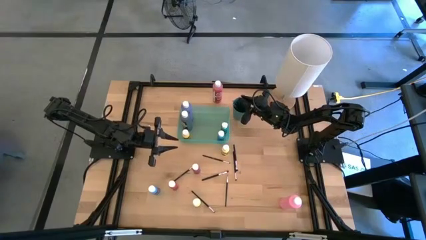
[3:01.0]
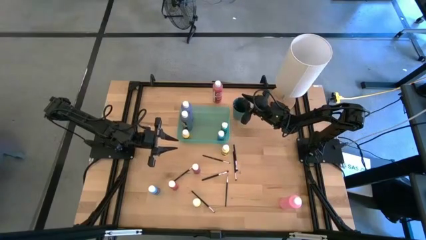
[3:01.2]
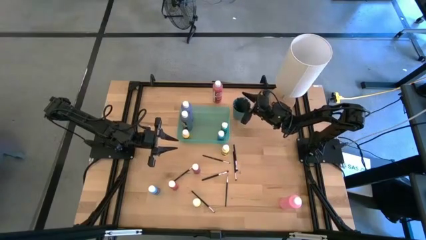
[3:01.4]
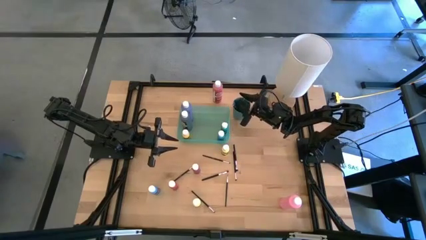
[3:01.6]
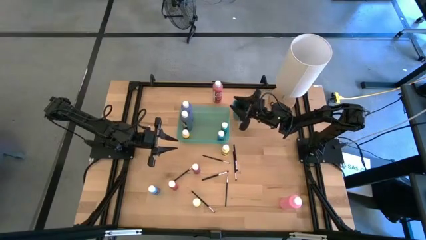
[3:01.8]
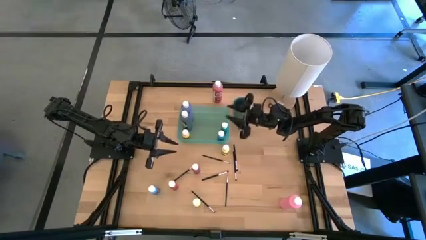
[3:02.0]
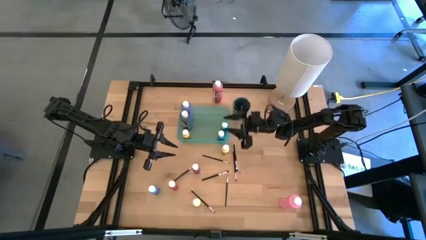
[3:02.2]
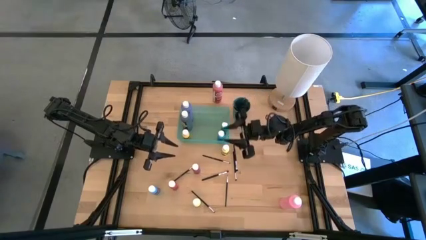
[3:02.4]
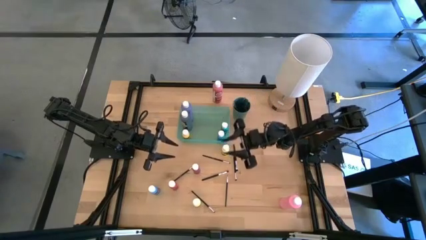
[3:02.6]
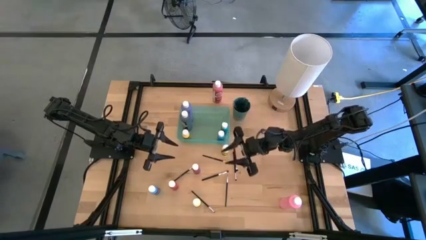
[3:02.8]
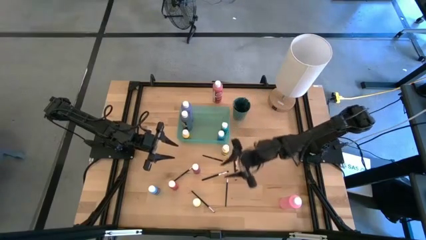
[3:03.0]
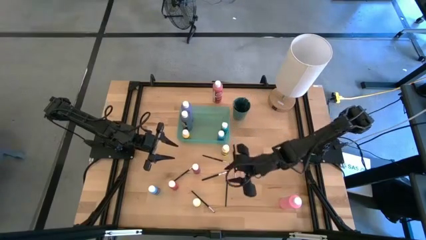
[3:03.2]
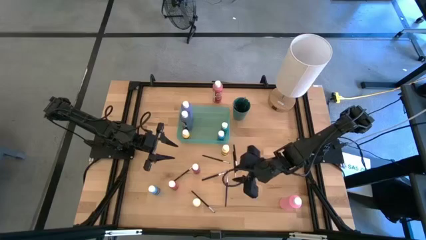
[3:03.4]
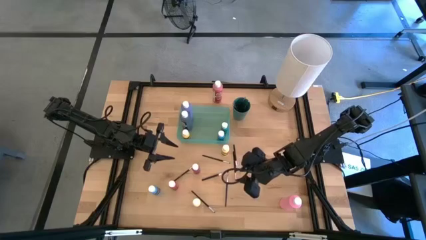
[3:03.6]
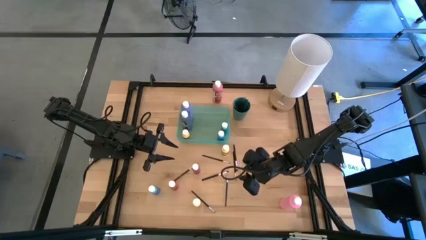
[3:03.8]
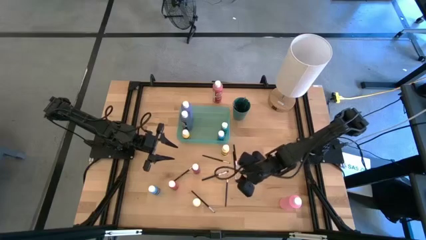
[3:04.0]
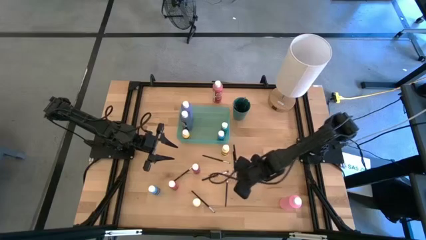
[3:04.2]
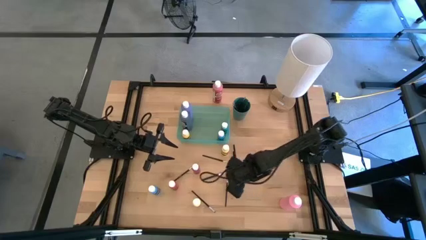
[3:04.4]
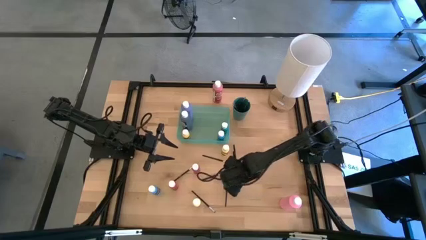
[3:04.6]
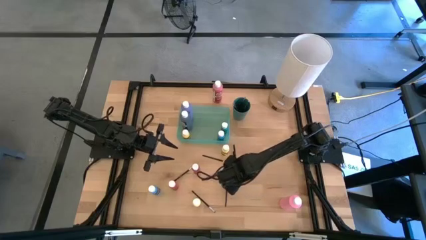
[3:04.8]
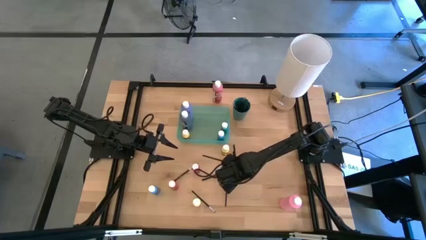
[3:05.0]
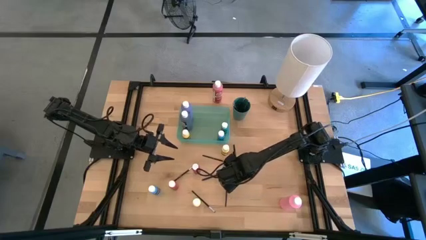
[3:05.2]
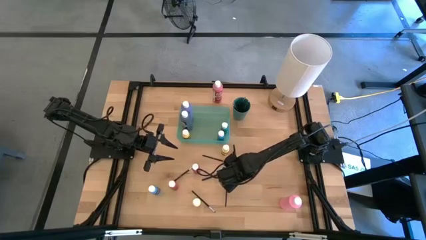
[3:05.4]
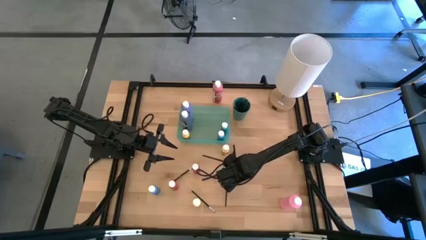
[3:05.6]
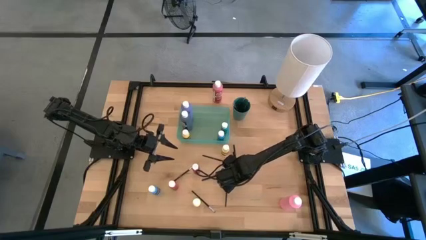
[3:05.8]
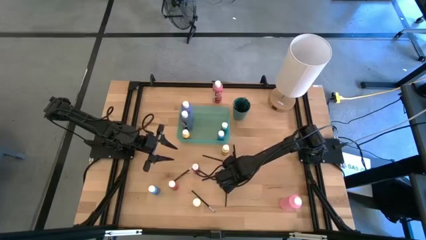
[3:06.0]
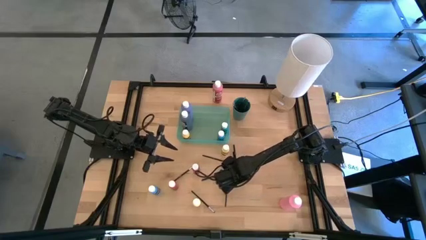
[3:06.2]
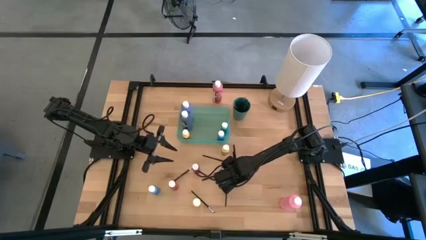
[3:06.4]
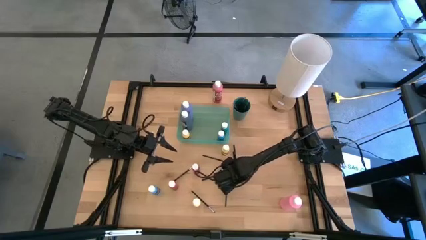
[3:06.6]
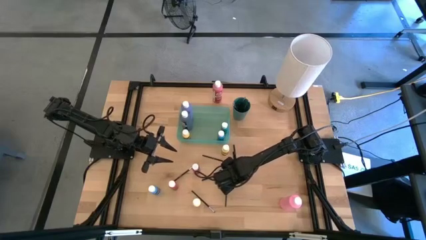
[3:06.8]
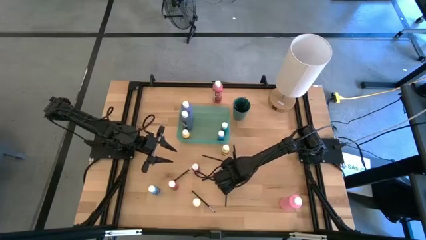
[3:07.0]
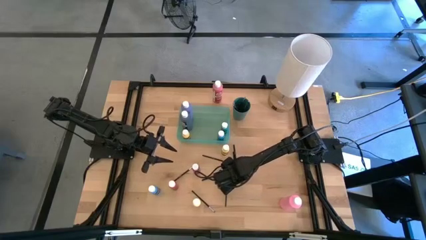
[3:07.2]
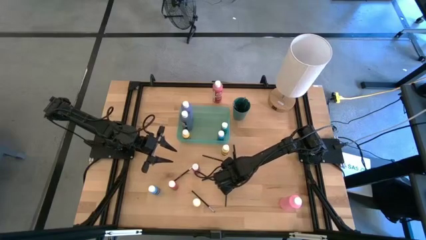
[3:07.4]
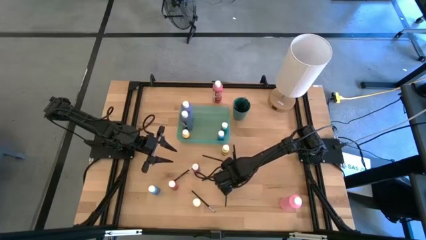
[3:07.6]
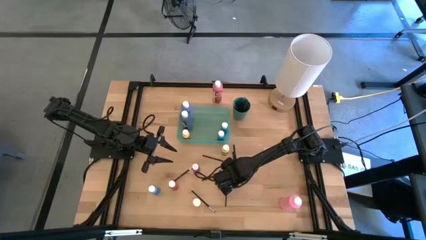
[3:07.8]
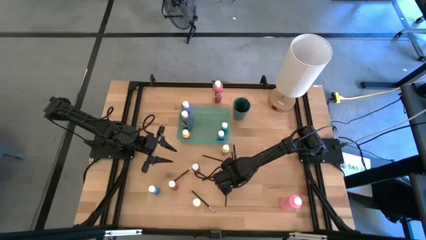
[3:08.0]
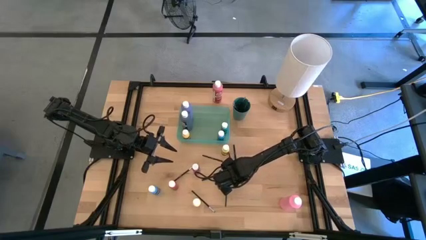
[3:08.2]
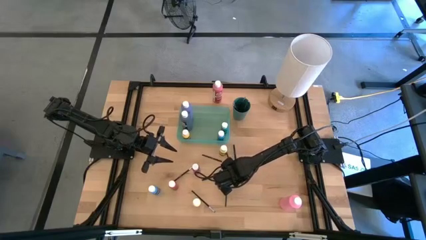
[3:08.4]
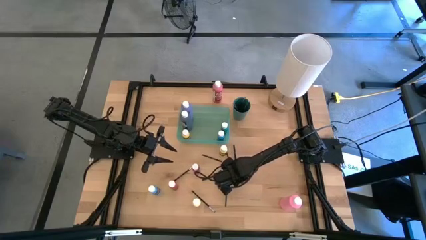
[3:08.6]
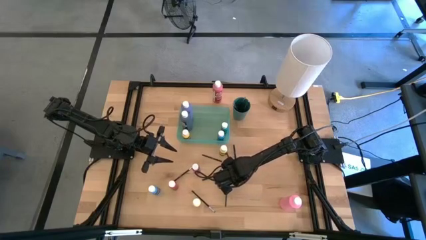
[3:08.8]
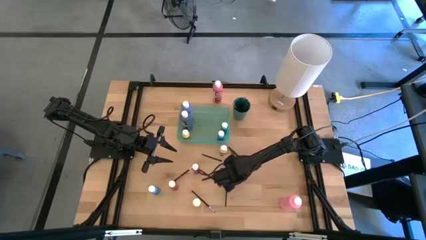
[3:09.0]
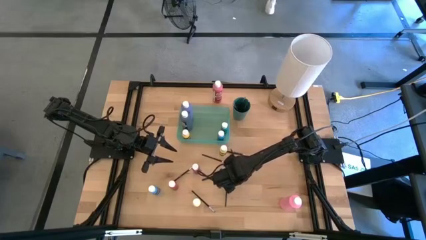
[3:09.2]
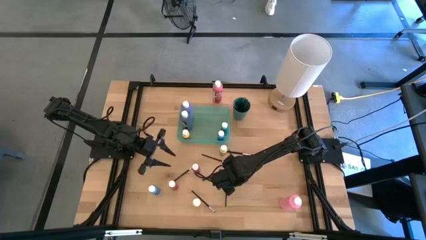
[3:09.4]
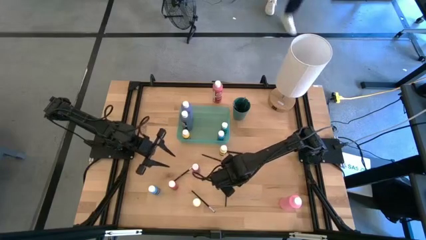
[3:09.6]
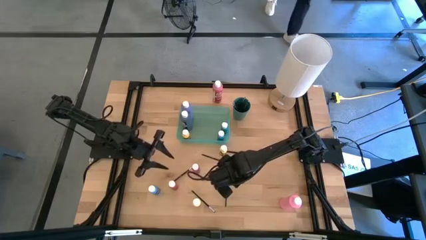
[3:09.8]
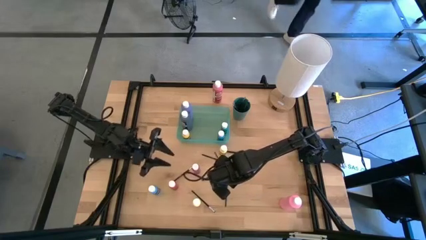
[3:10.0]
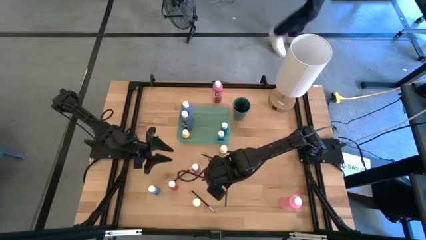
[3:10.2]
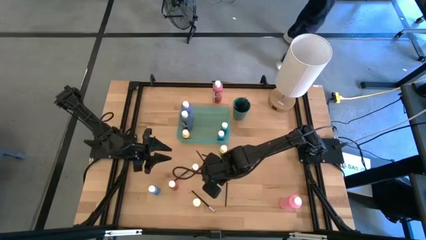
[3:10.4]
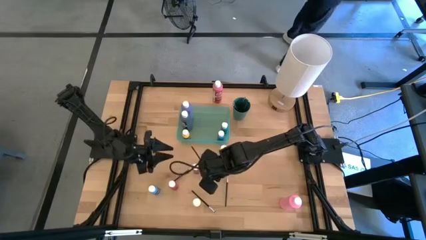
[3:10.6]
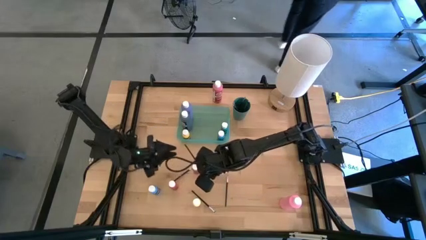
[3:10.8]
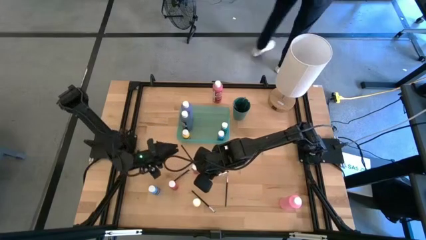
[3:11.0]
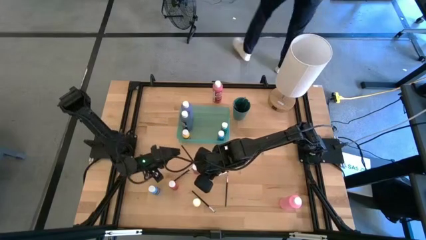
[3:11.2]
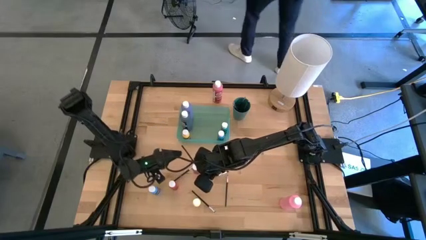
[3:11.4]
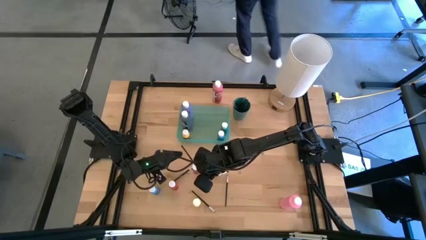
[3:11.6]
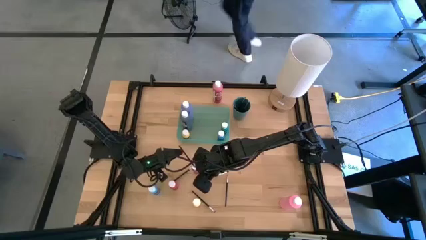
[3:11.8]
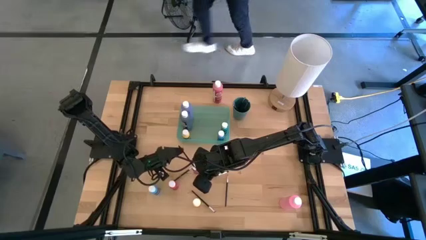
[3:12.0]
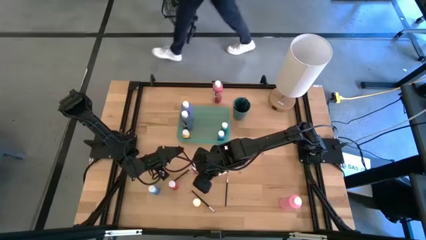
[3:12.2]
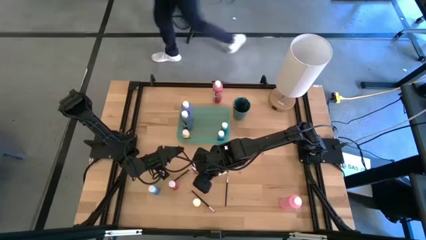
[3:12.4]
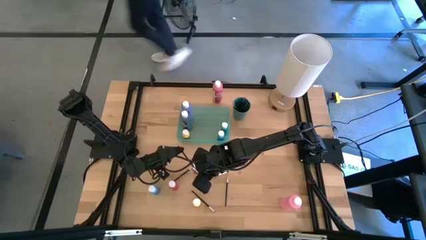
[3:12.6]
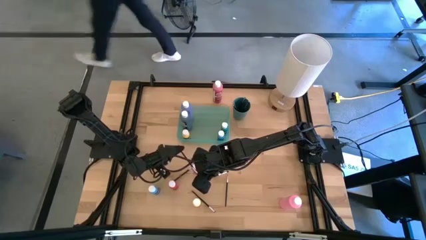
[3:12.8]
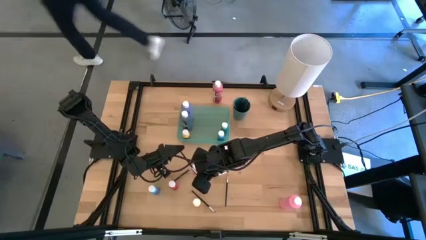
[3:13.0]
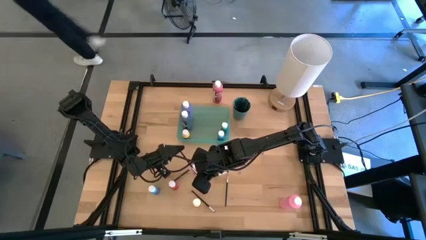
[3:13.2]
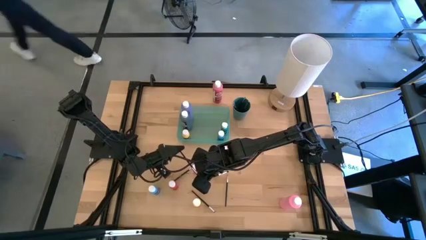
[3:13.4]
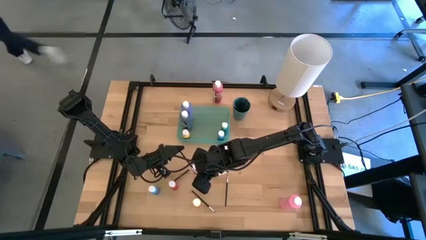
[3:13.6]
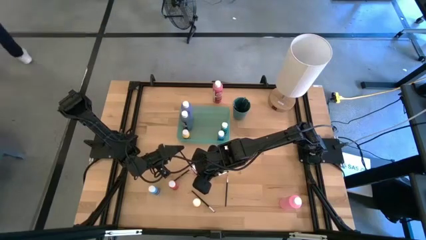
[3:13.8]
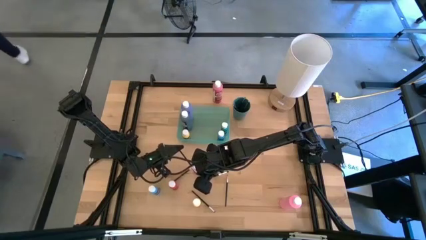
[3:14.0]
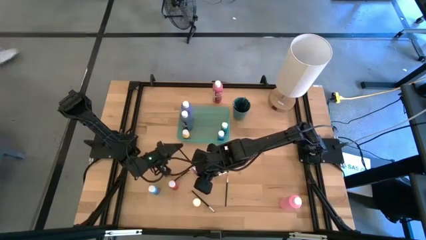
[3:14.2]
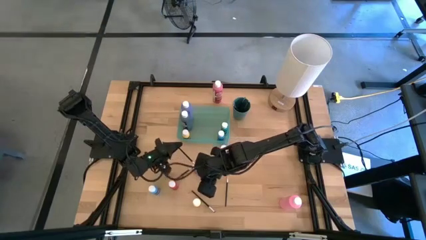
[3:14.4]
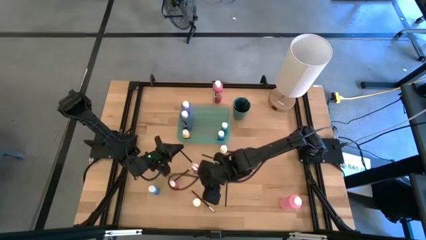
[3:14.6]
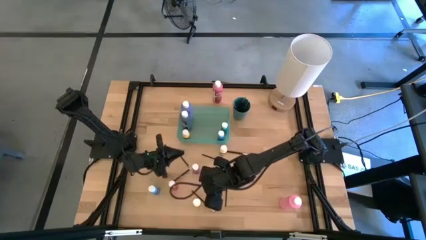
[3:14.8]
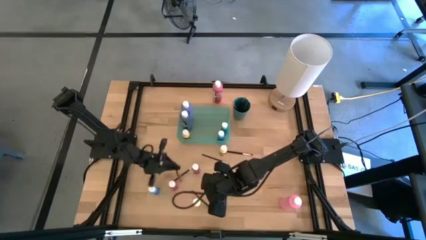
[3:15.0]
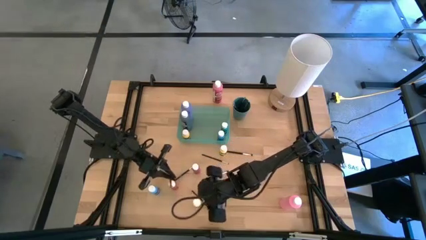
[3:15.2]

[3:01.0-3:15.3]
Task: Pick & Place Paint Supplies
Put the black paint brush into the dark green cup
